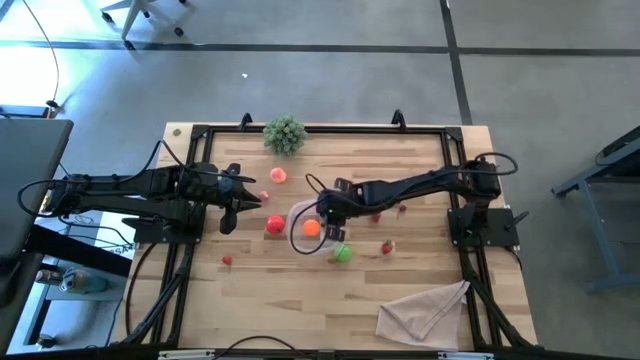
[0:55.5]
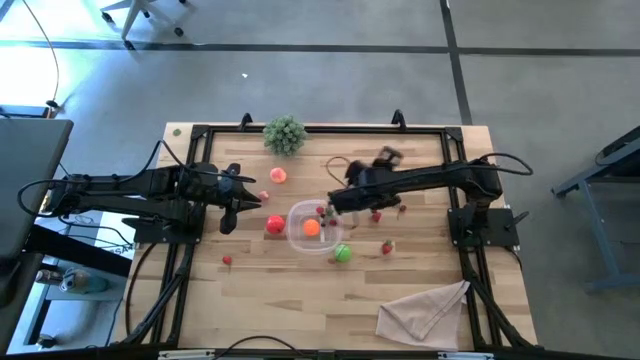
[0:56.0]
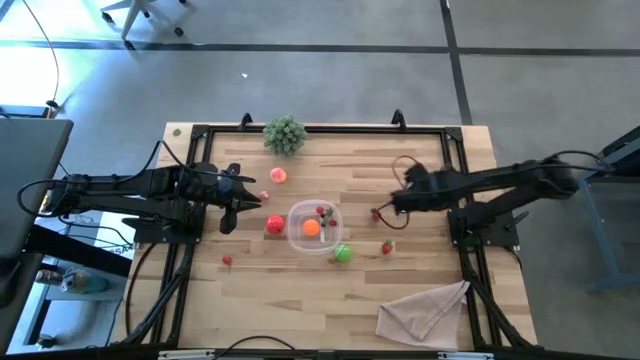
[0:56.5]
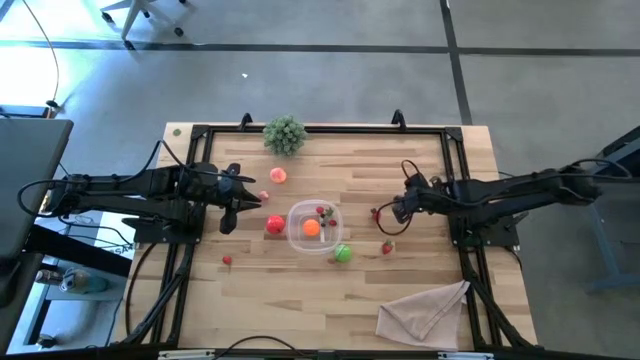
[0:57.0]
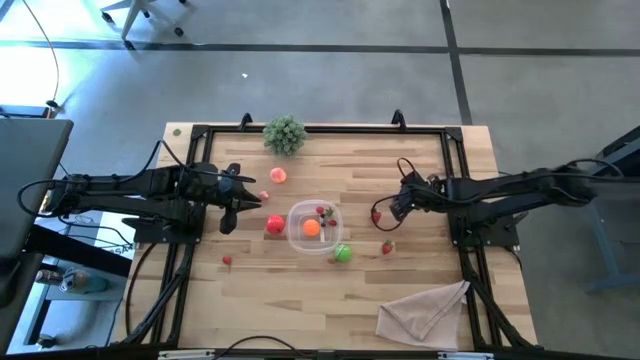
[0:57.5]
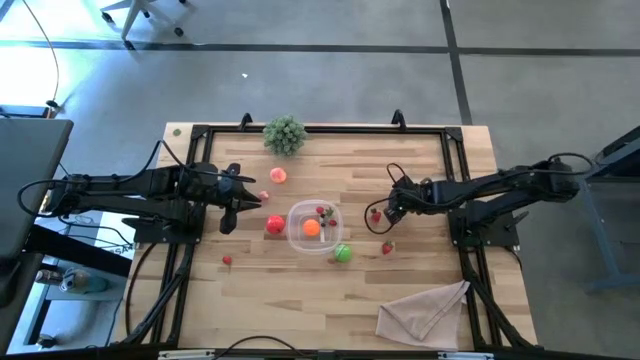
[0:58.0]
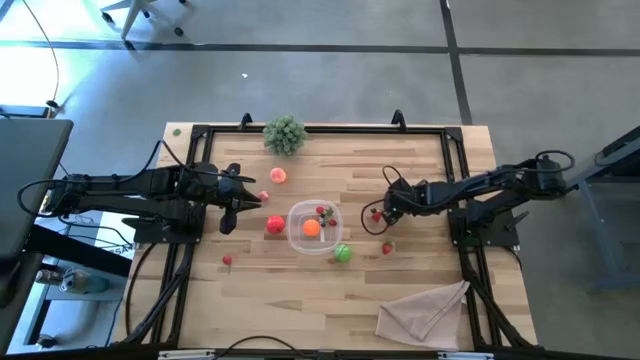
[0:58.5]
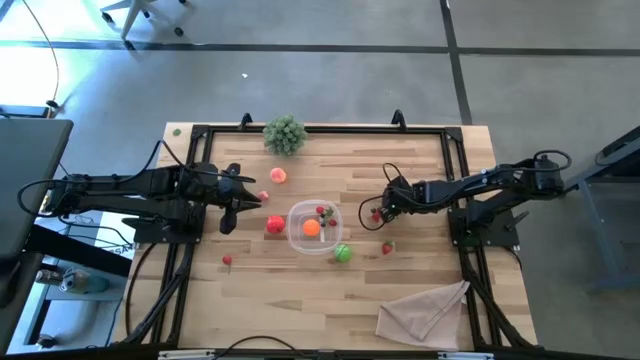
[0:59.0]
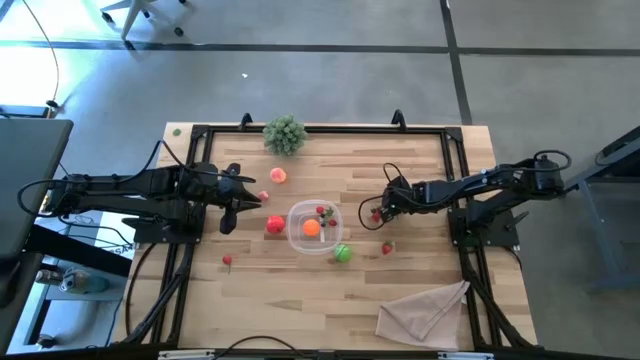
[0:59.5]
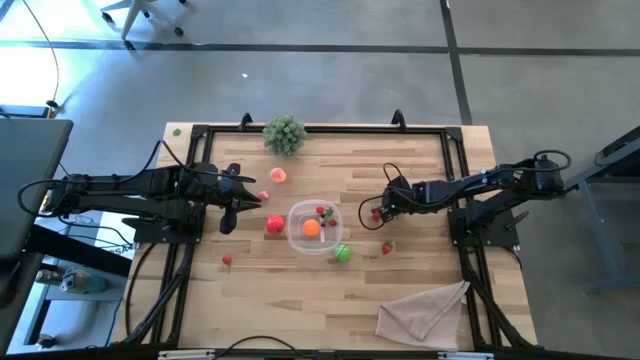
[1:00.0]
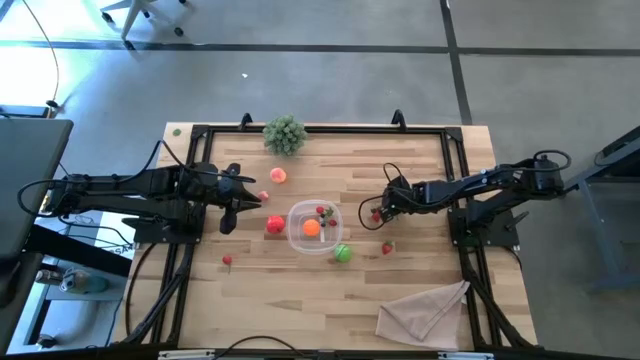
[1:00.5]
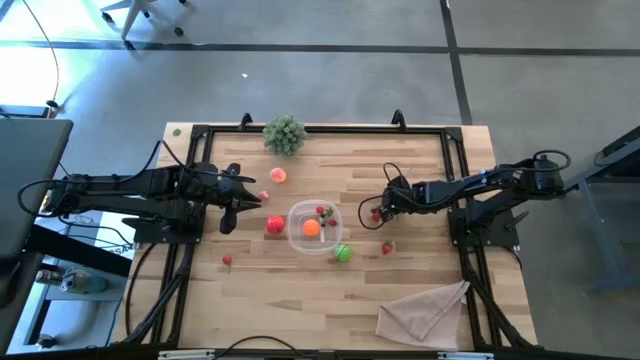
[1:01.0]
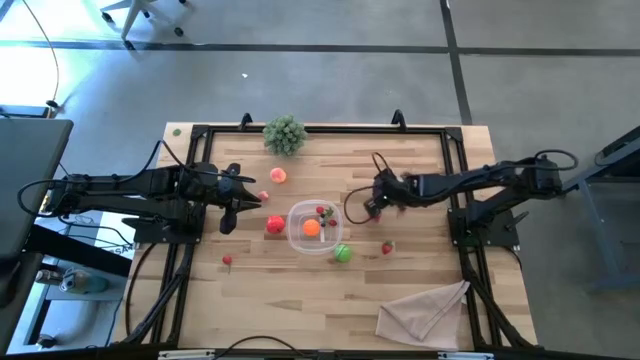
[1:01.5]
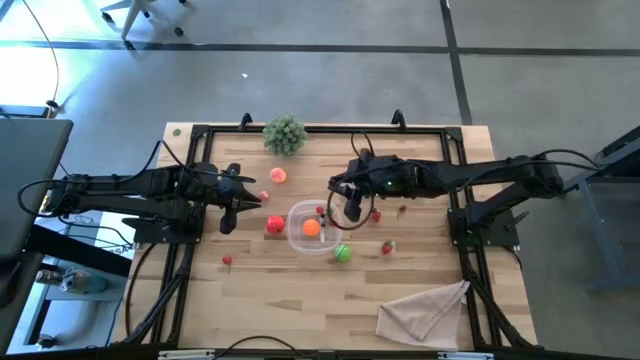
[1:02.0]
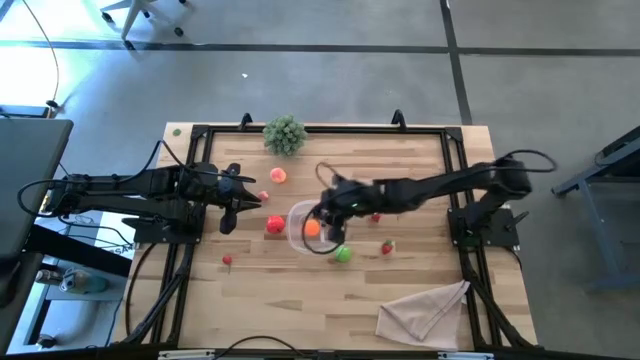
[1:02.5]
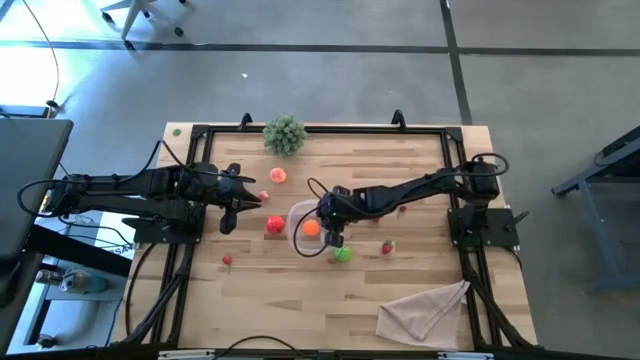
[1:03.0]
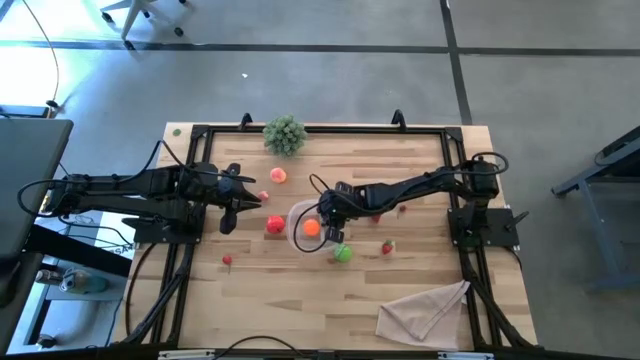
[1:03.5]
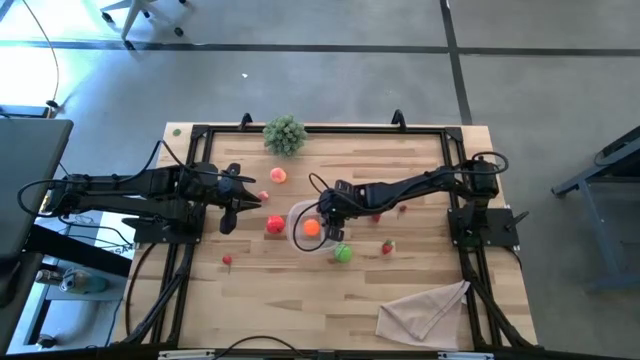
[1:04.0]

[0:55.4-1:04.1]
Task: Pick and placing Produce into tupperware
Put the blackberry into the transparent bin

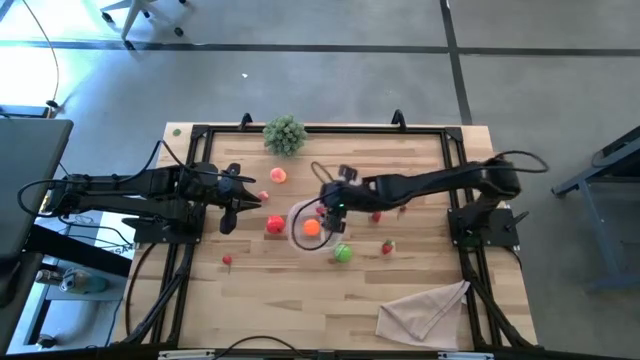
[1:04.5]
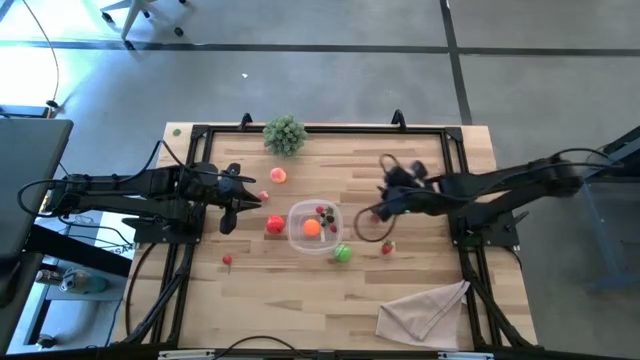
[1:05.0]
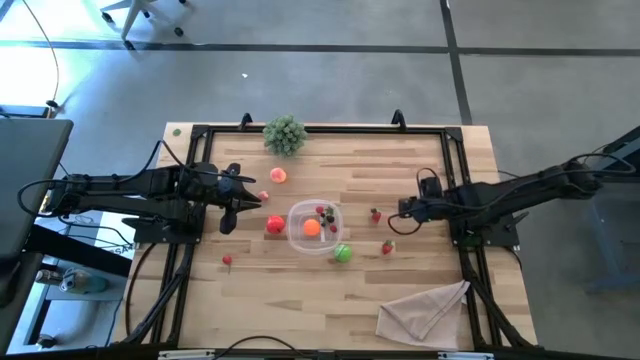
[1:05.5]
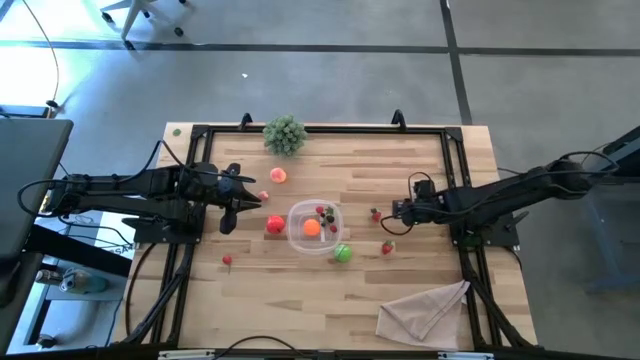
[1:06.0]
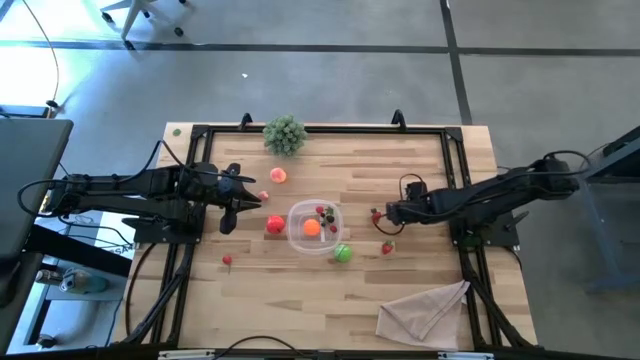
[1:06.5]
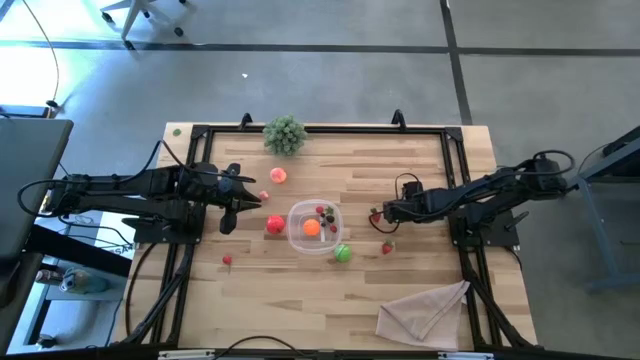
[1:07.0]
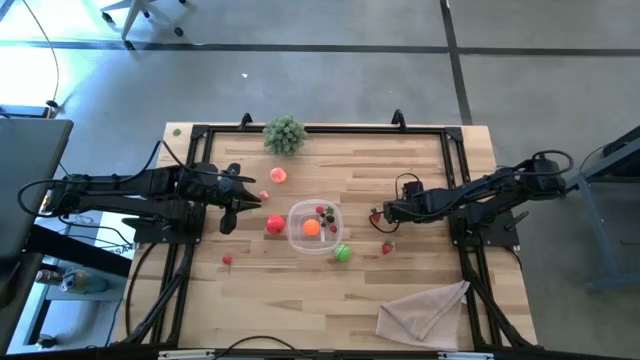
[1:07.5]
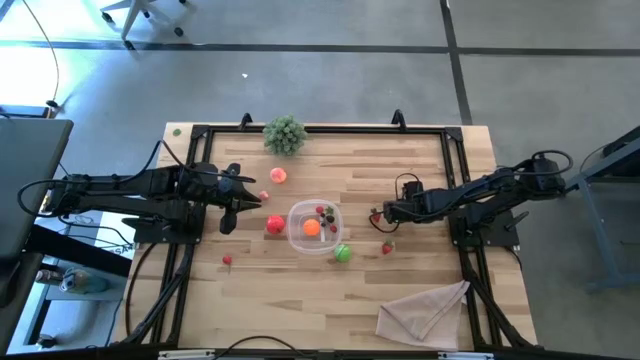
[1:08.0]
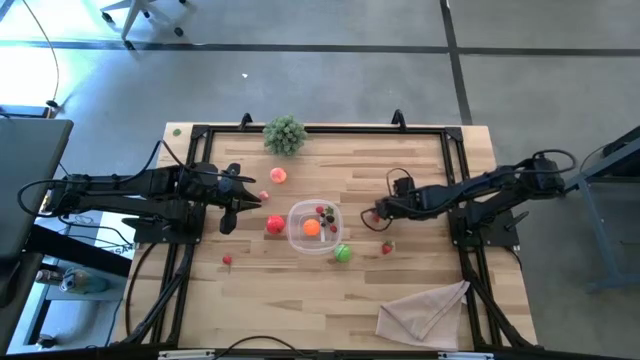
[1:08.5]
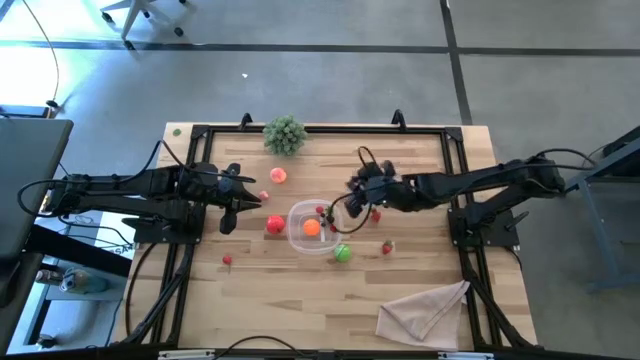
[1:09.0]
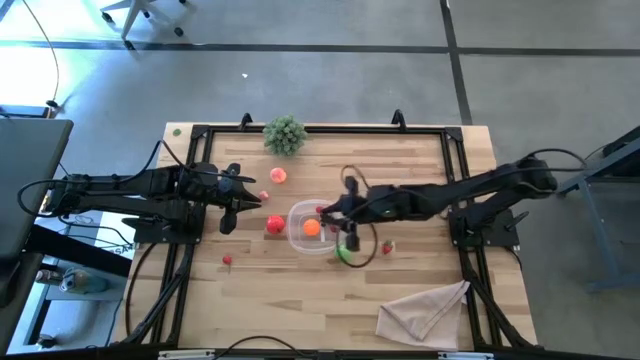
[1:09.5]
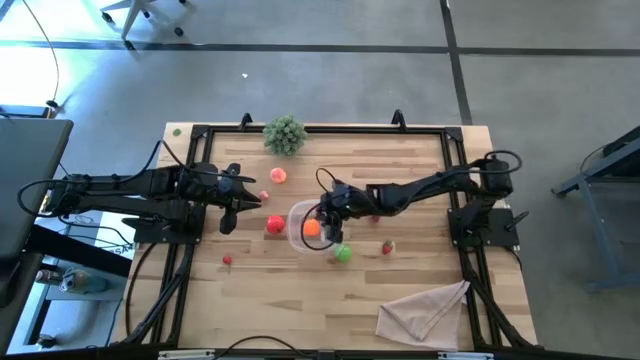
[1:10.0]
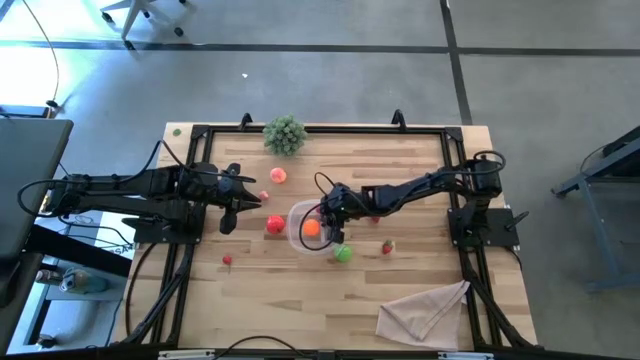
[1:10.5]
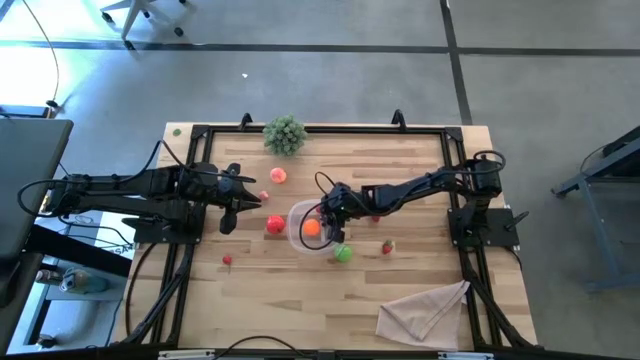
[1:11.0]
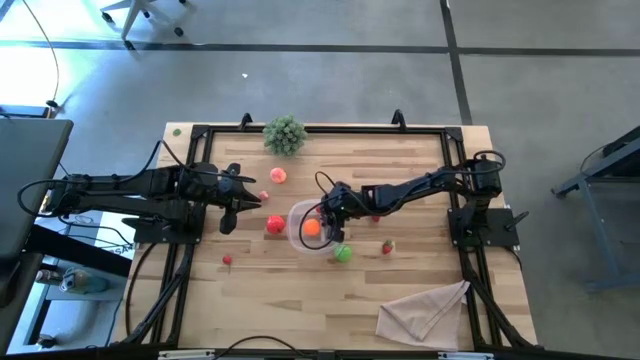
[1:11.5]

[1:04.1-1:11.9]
Put the shrivelled cherry into the transparent bin

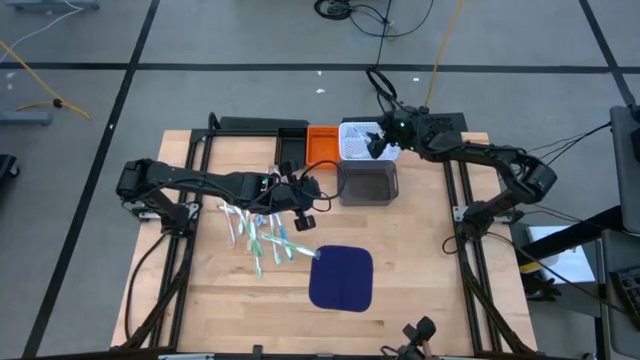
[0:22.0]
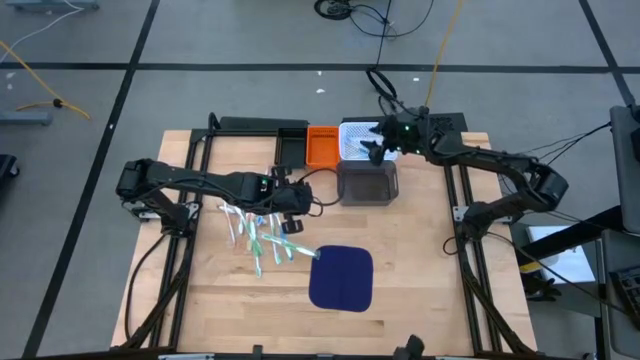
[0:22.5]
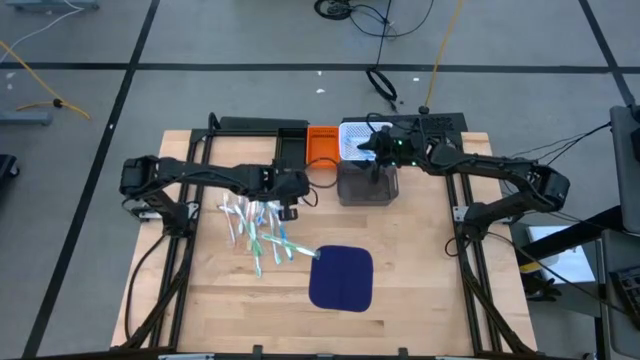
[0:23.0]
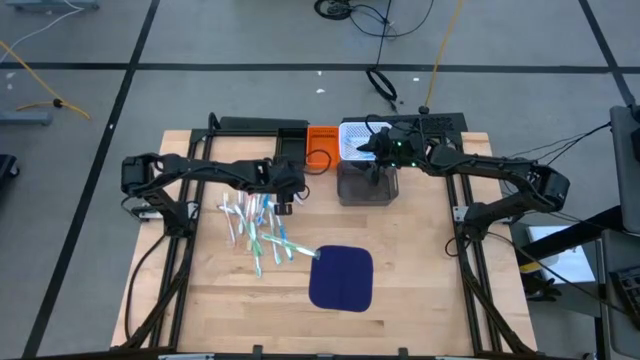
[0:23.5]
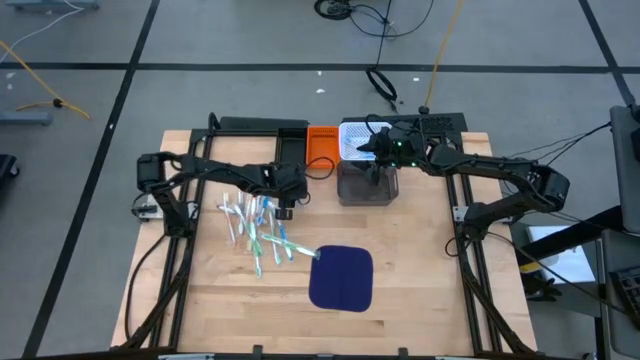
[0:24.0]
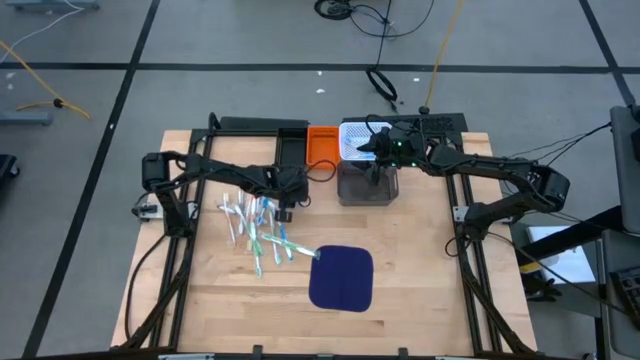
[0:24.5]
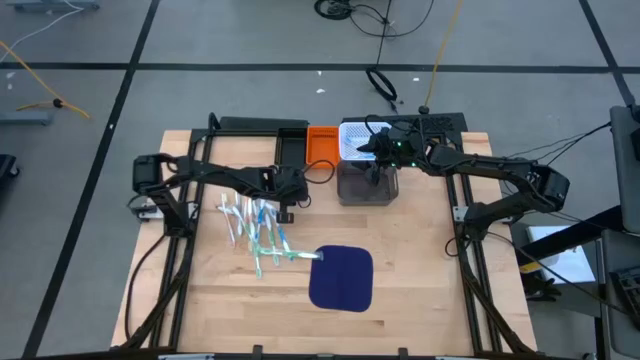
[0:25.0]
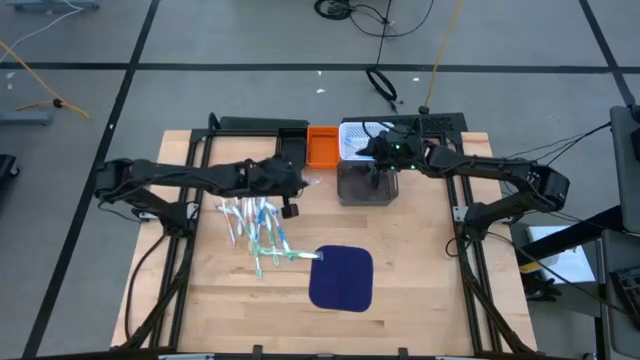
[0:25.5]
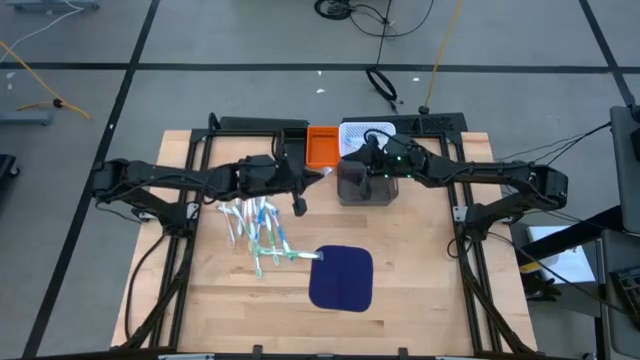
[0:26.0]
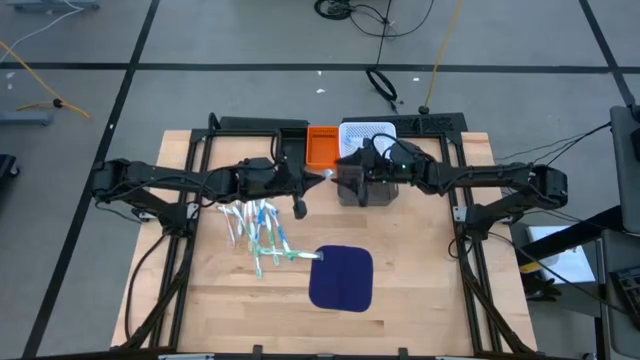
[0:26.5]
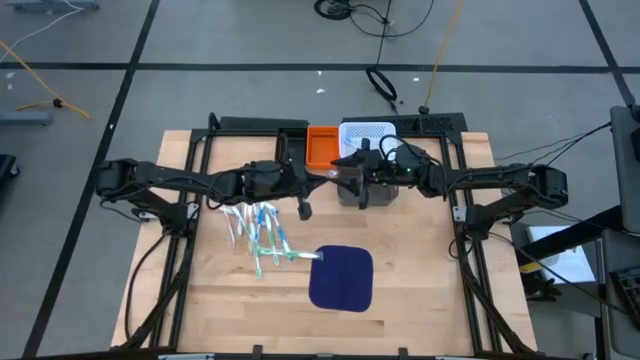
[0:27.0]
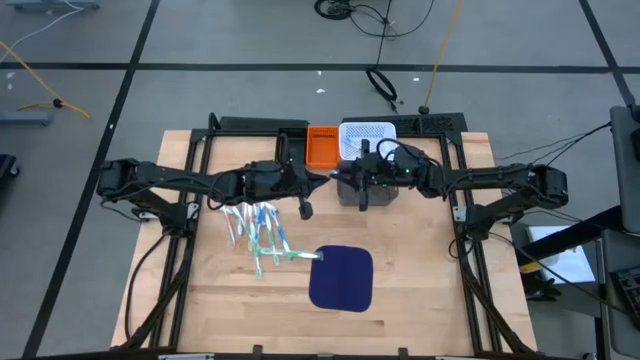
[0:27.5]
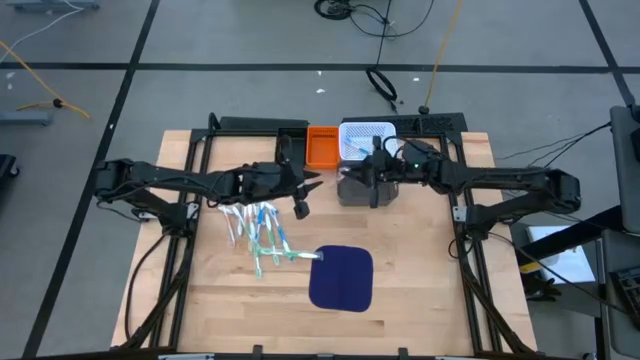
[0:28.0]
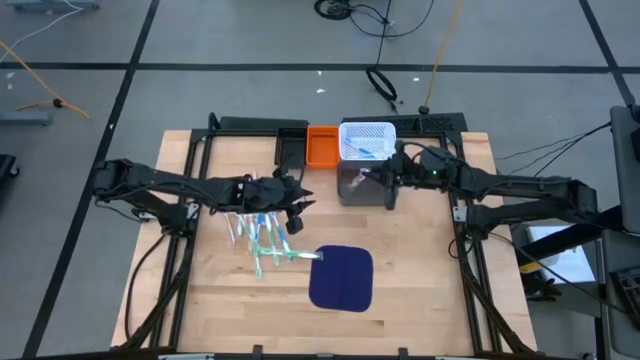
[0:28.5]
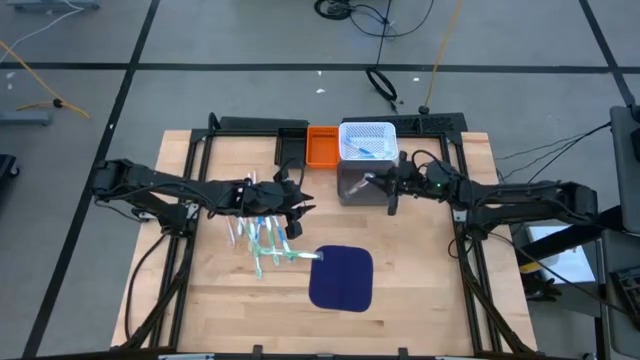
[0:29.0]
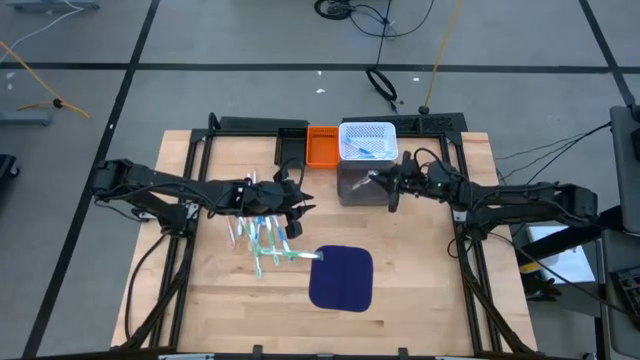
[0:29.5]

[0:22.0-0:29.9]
Task: Pick & Place Toothbrushes
Put the violet toothbrush into the gray basket
